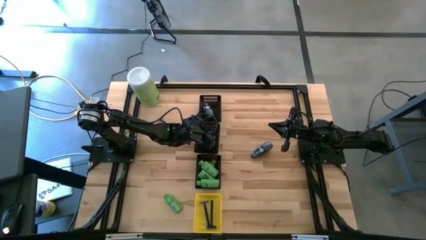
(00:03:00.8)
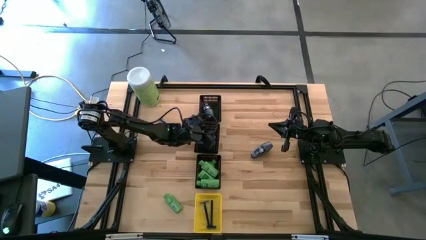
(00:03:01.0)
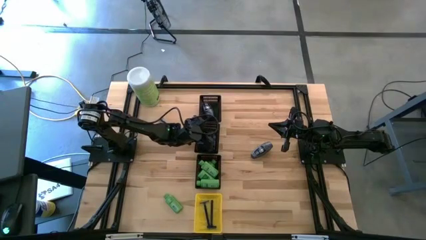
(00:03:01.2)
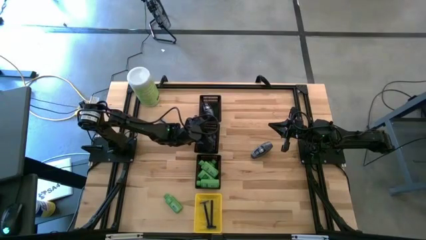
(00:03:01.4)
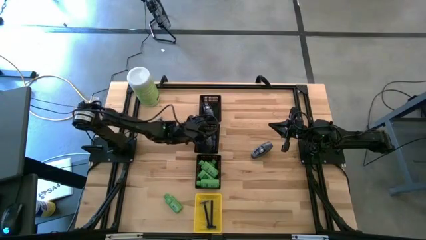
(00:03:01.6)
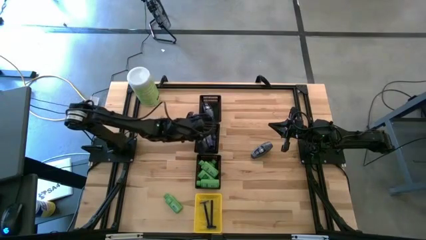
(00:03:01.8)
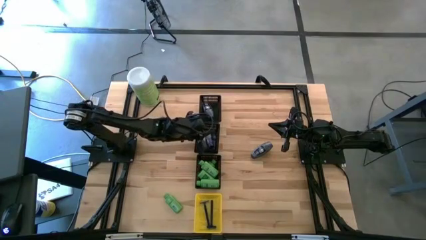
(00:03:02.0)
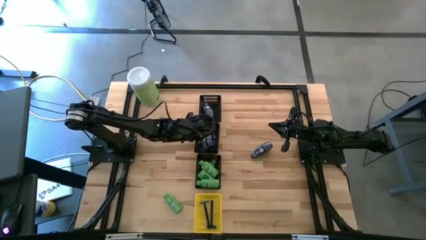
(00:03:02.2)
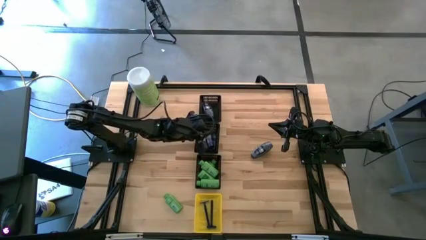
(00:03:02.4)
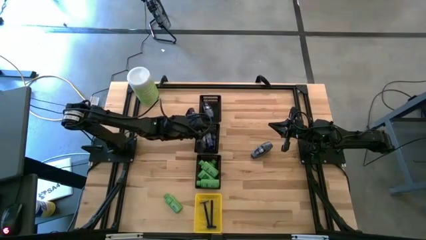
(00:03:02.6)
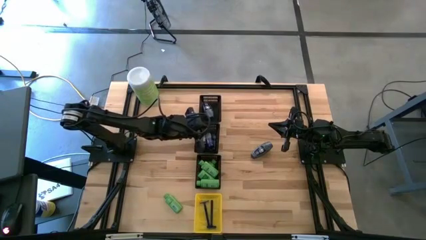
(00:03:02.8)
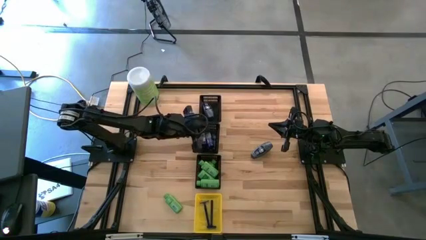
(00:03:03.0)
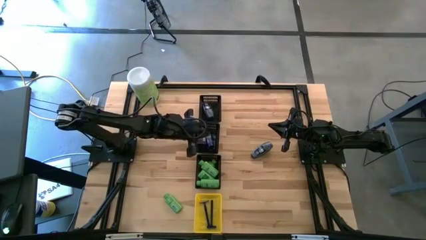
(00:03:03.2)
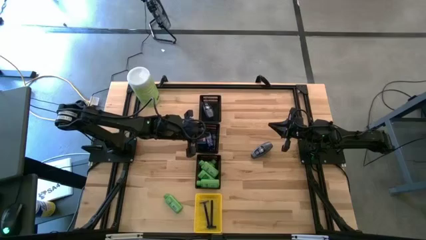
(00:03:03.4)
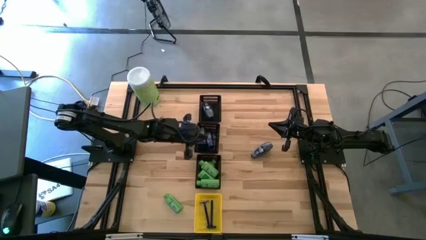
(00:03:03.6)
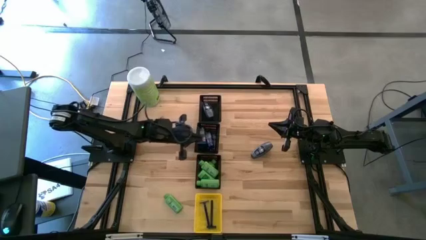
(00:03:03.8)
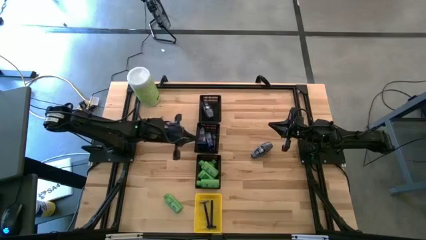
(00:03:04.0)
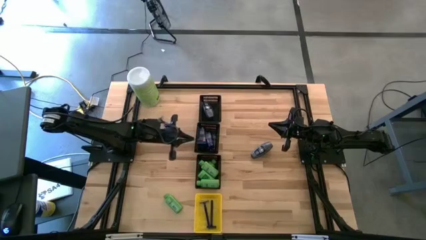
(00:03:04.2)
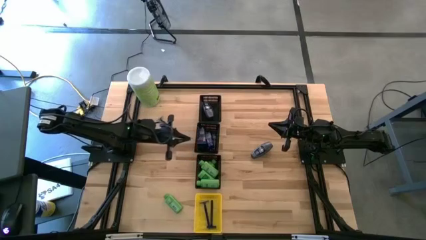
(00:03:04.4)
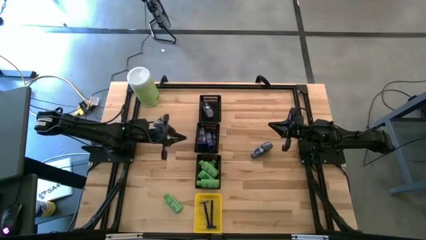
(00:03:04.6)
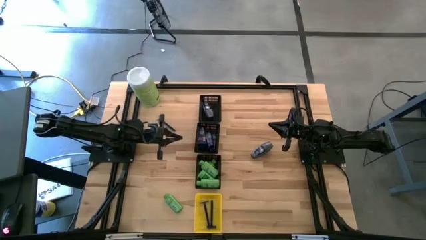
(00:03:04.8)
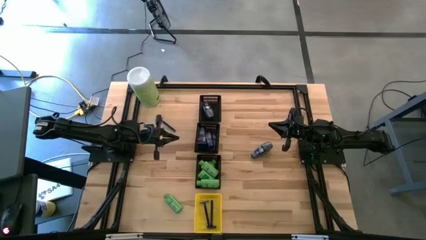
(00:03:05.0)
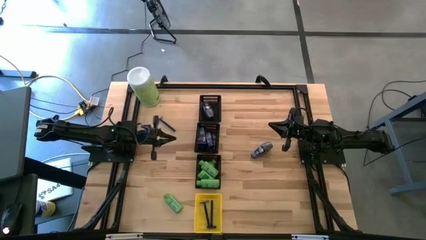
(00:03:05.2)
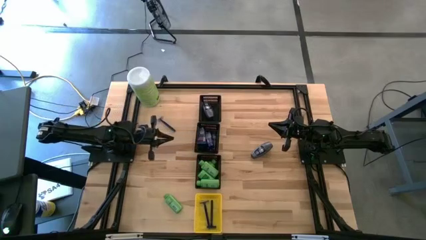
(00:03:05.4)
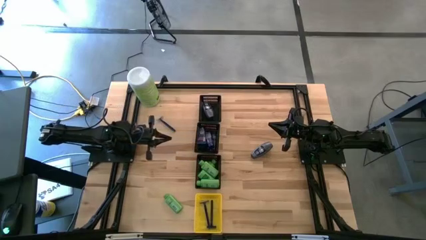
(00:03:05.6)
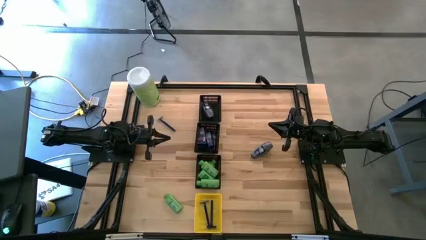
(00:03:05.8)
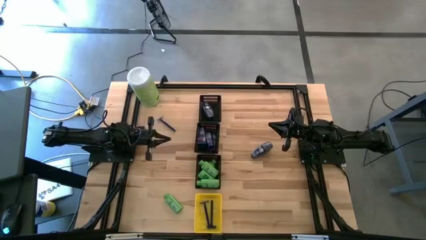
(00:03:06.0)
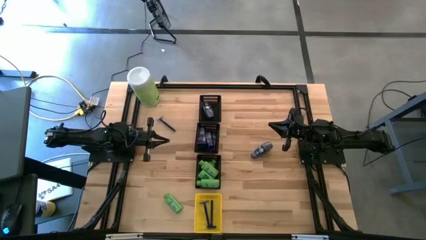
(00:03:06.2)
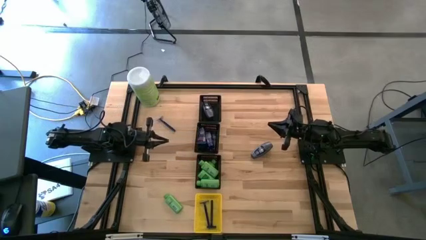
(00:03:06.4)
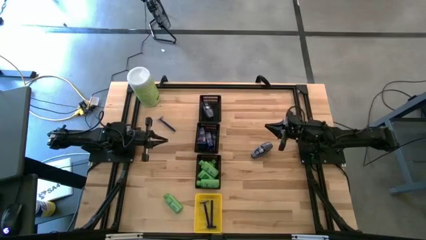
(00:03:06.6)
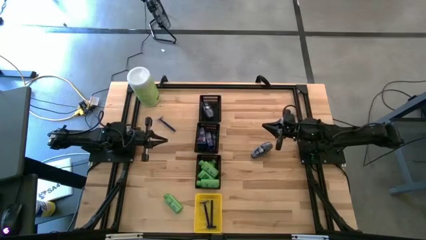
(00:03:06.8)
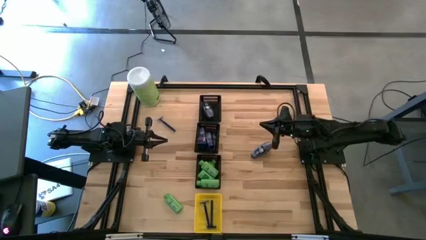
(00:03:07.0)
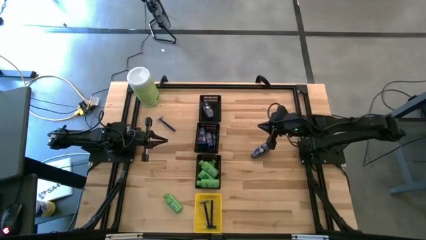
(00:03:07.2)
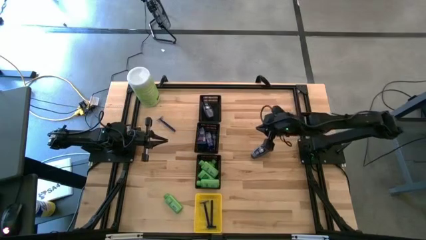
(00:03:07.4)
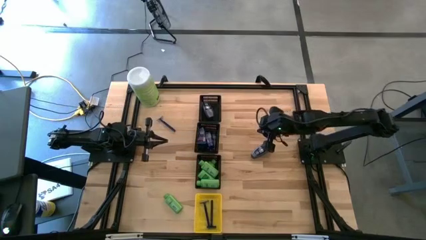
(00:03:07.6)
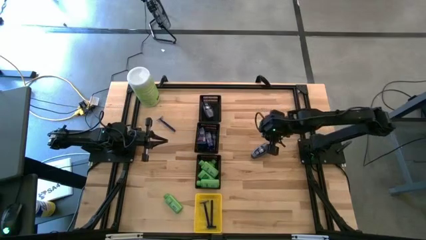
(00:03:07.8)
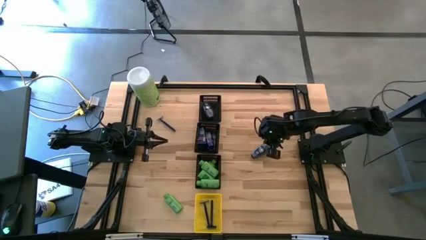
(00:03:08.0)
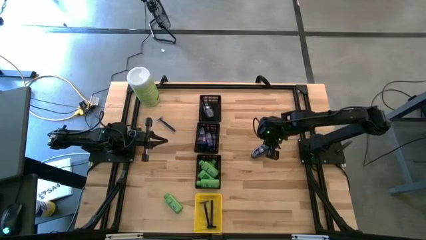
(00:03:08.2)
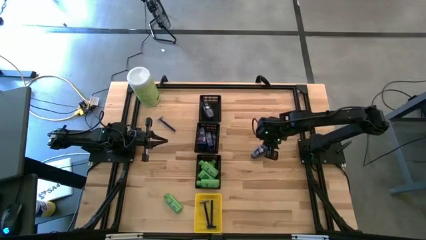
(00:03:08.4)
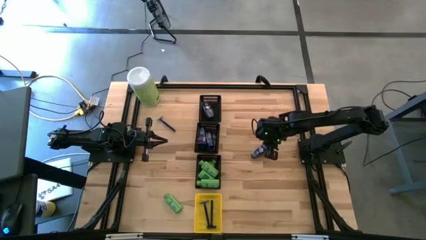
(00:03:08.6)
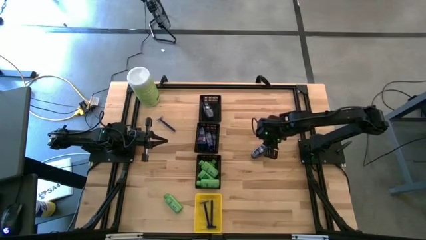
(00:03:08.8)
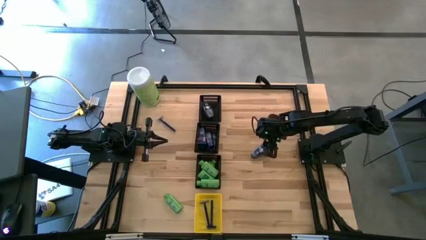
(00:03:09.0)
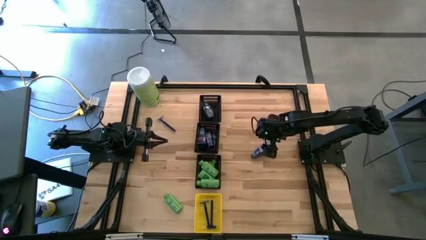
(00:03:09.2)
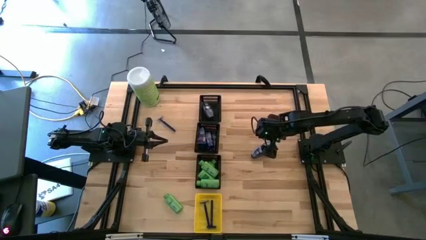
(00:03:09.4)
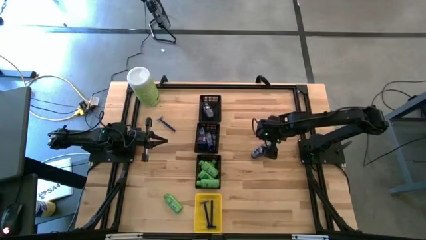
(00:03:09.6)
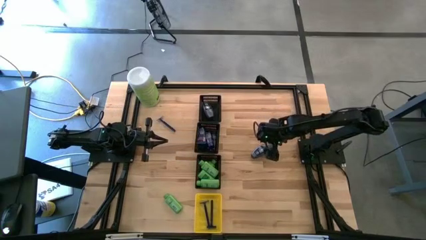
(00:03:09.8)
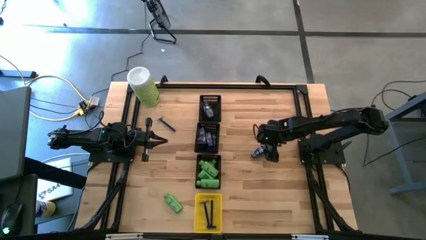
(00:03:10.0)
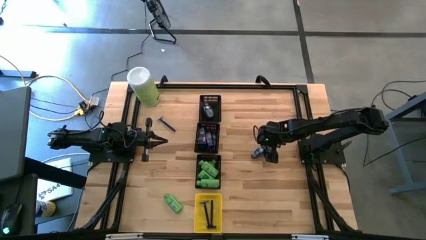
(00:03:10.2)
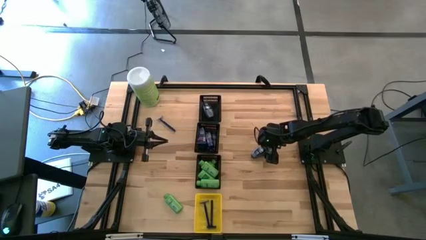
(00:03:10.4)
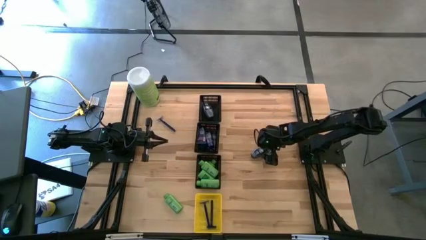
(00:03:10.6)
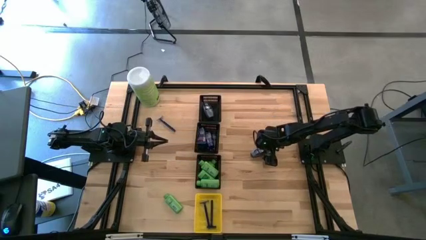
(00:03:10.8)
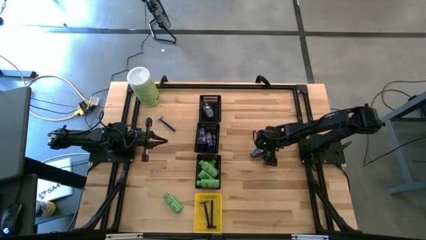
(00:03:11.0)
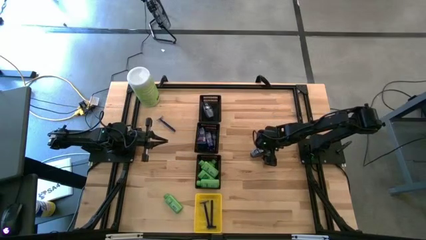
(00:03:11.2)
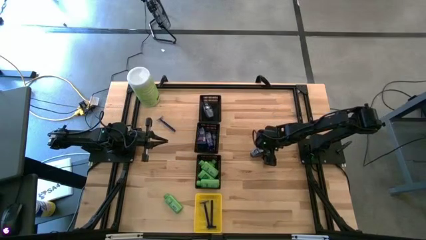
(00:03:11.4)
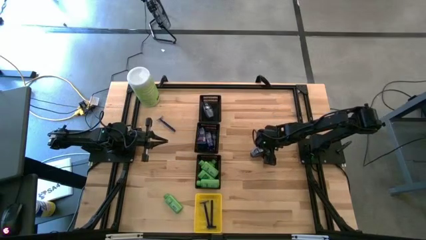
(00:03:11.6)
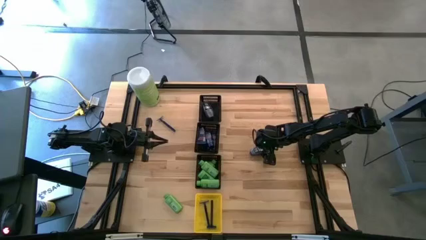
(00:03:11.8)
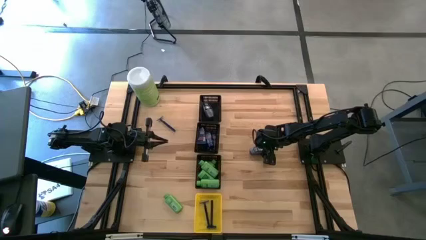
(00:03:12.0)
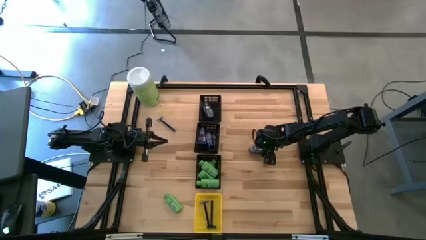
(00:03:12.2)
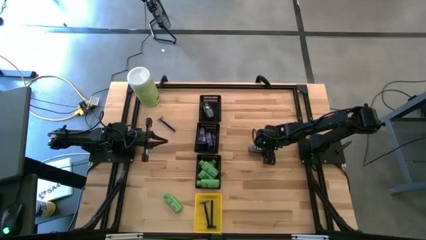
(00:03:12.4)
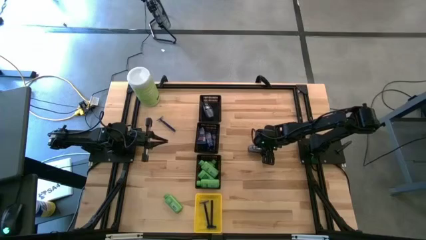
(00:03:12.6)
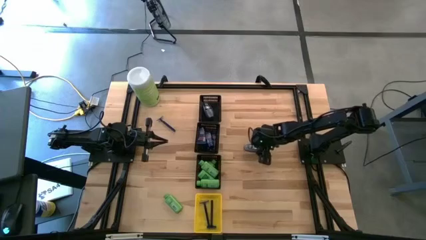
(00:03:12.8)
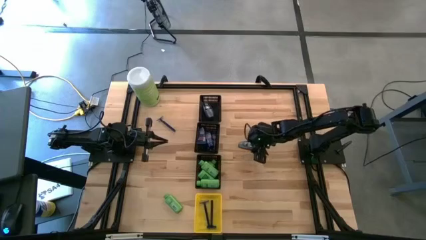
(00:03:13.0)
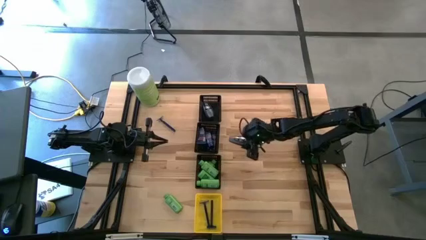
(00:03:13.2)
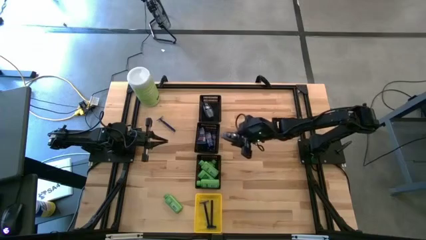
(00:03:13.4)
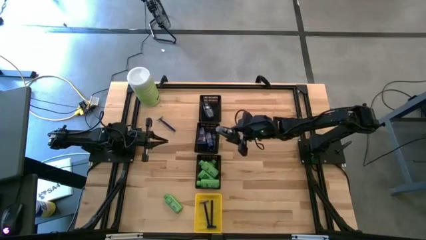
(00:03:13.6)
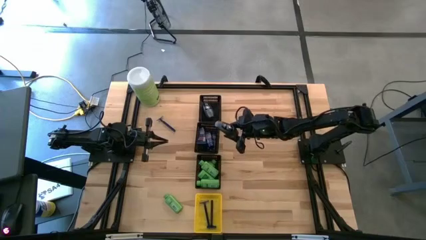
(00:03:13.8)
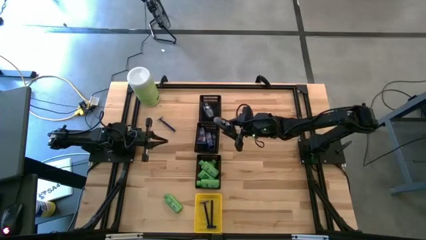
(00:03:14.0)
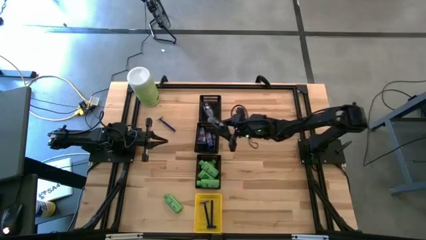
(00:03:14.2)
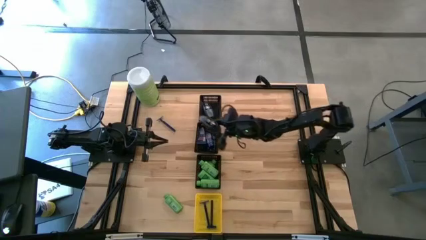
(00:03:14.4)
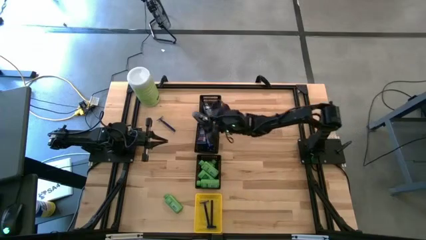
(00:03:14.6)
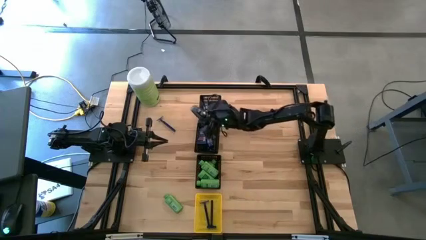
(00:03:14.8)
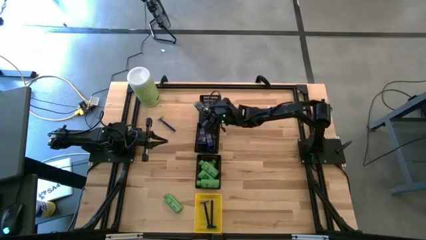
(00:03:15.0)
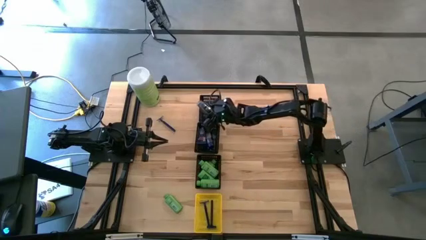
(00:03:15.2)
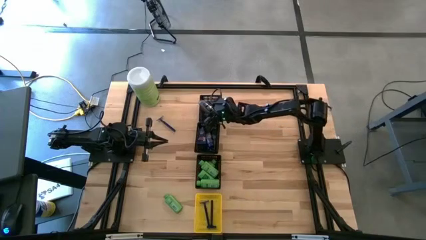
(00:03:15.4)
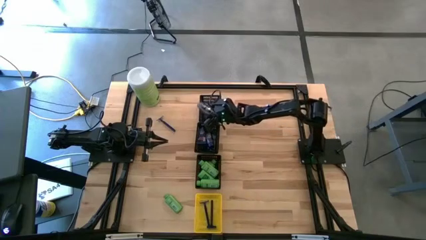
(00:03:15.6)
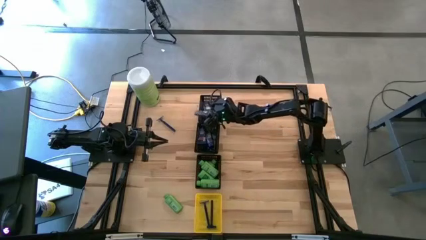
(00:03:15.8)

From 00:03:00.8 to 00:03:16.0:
Task: Pick & Place Travel size toiletries
Put the black deodorant bottle into the top black bin
